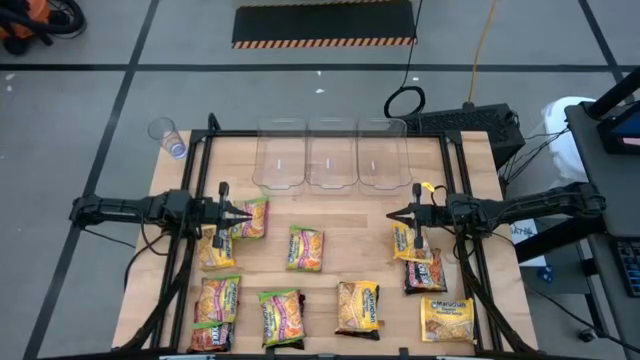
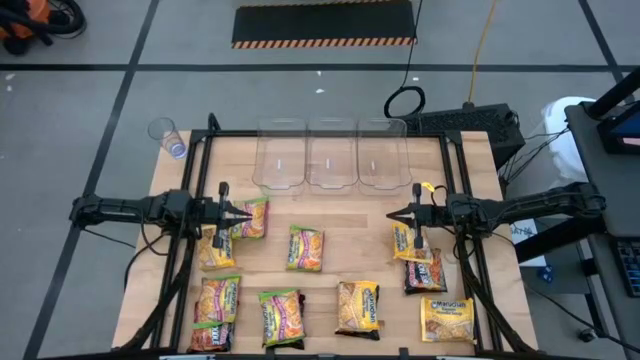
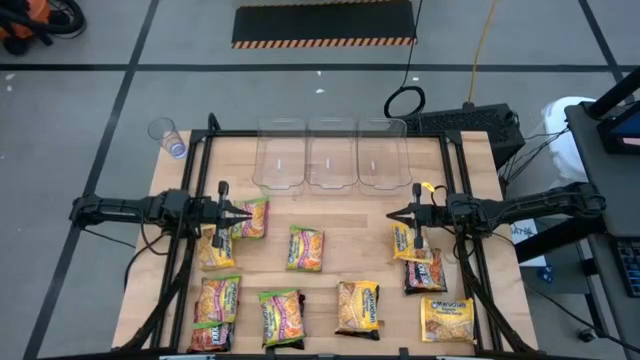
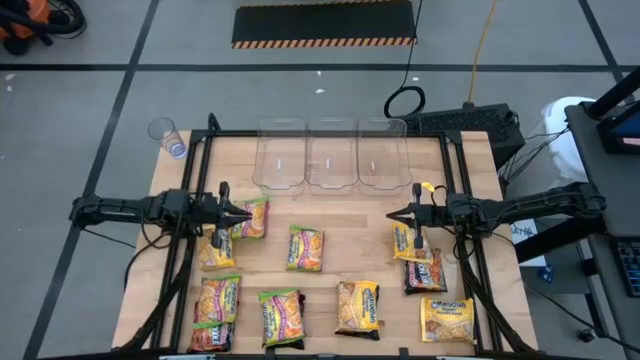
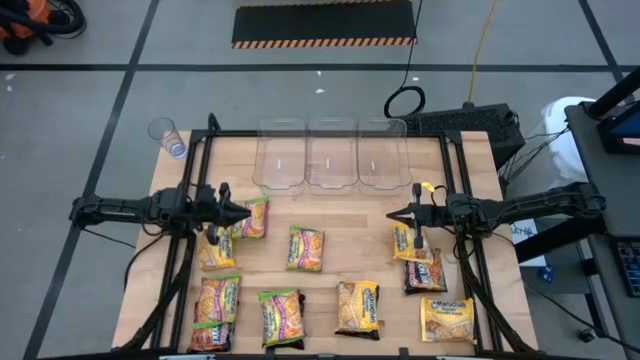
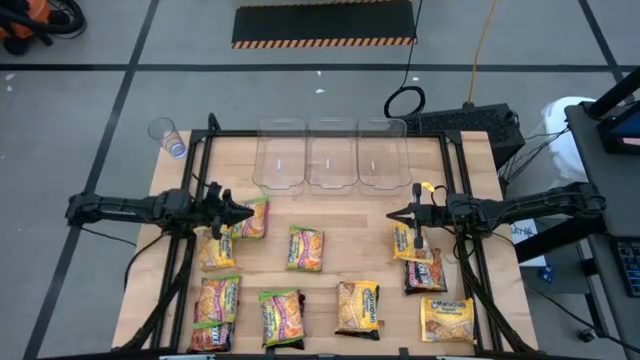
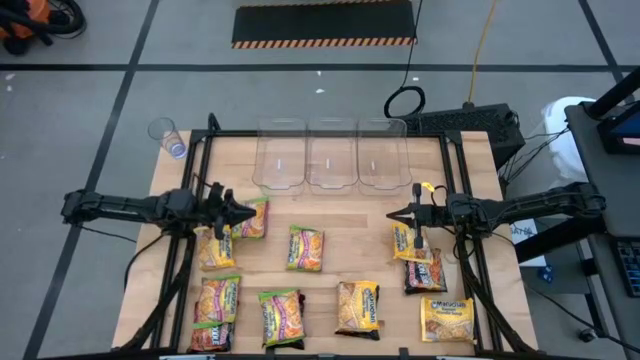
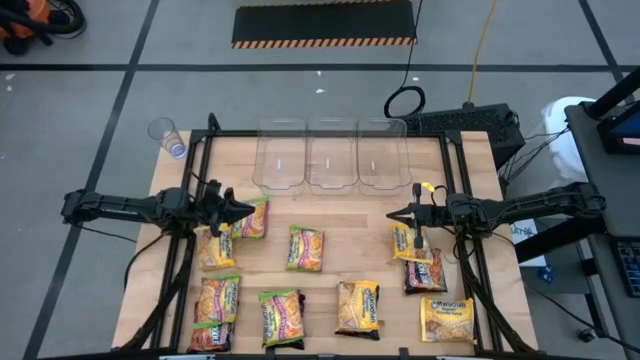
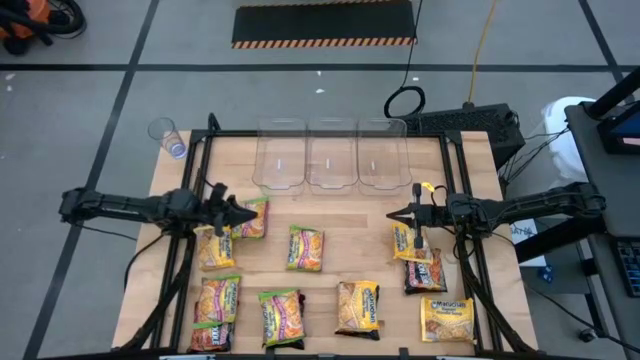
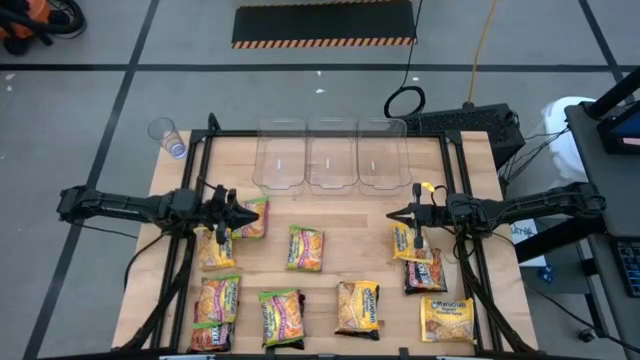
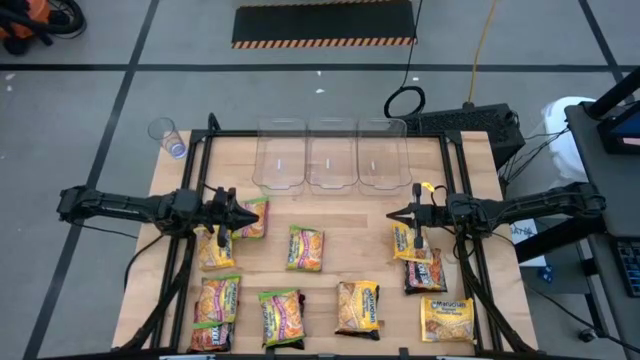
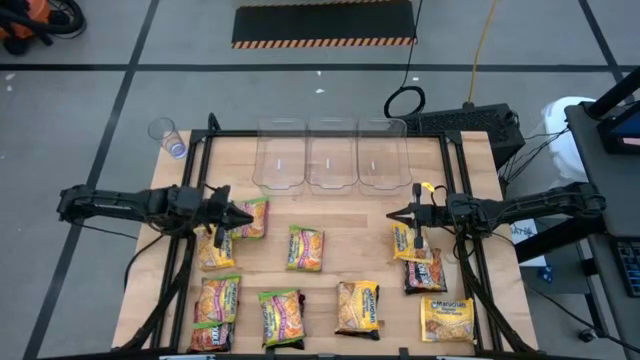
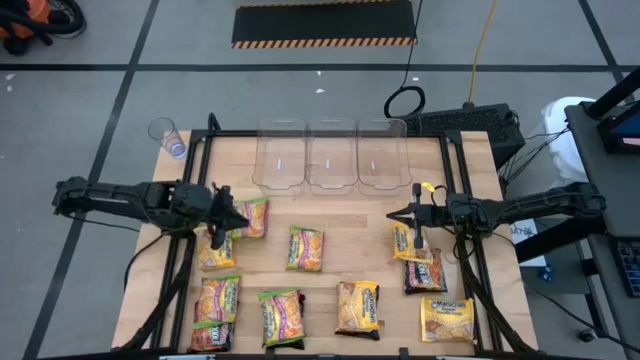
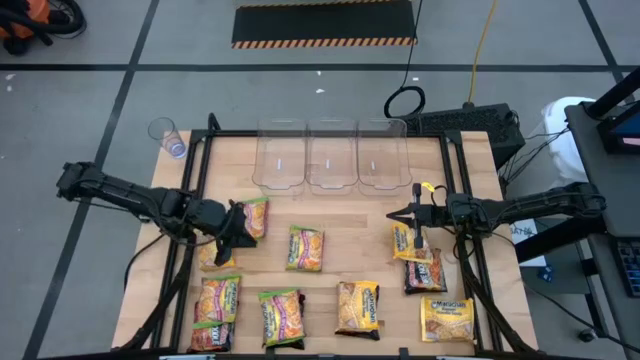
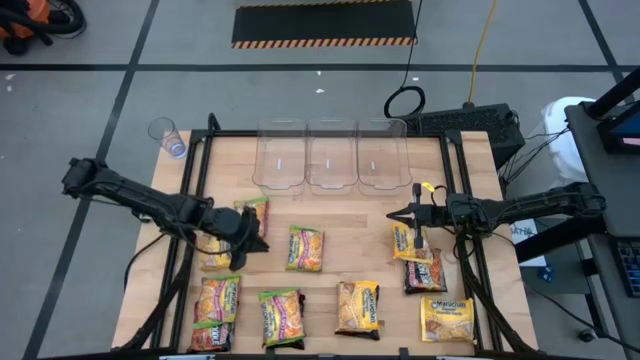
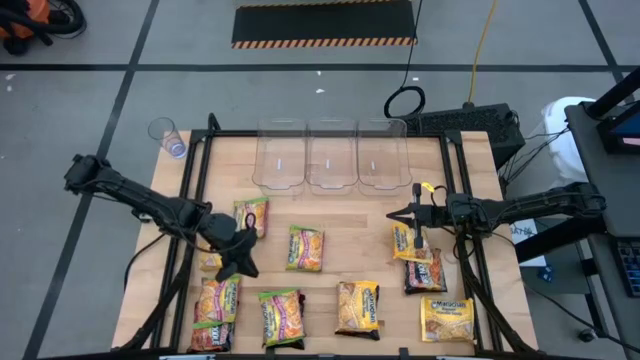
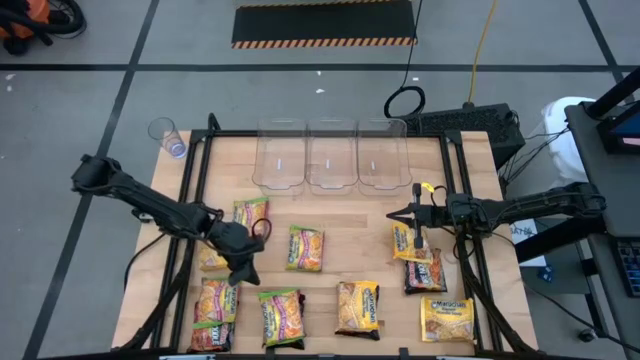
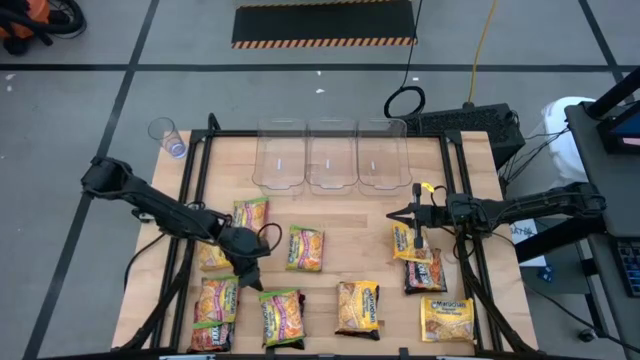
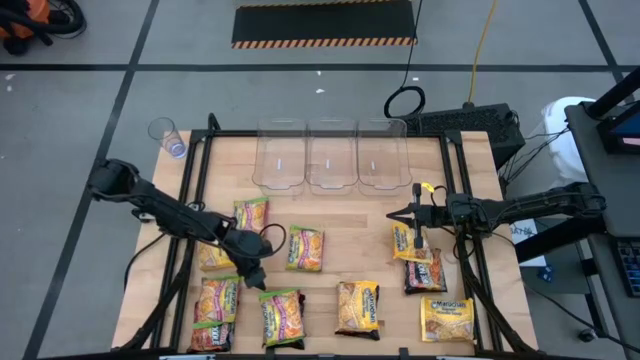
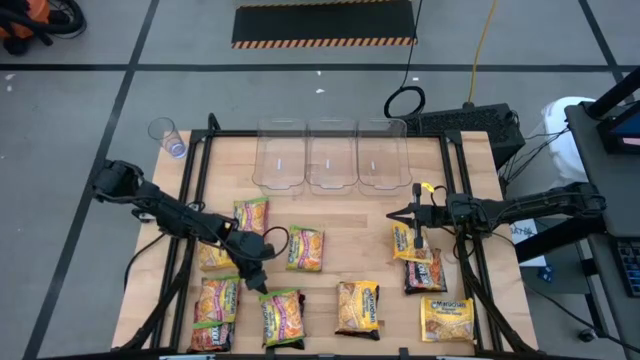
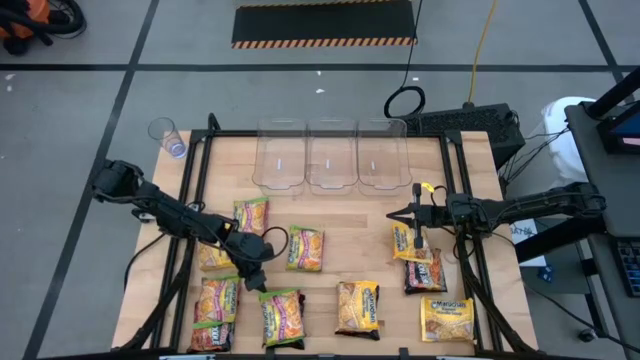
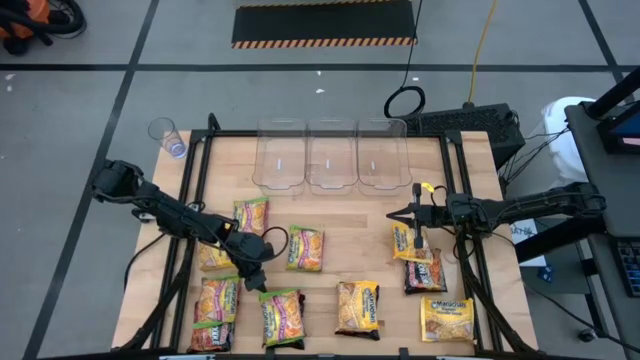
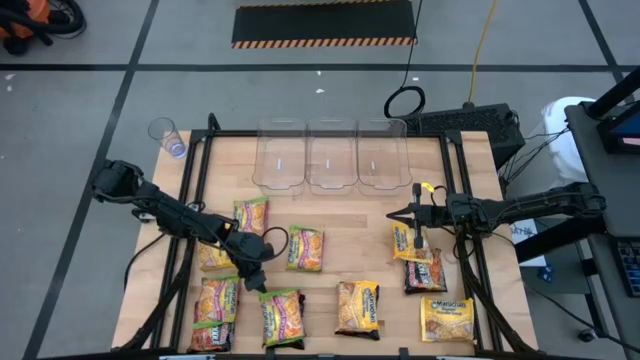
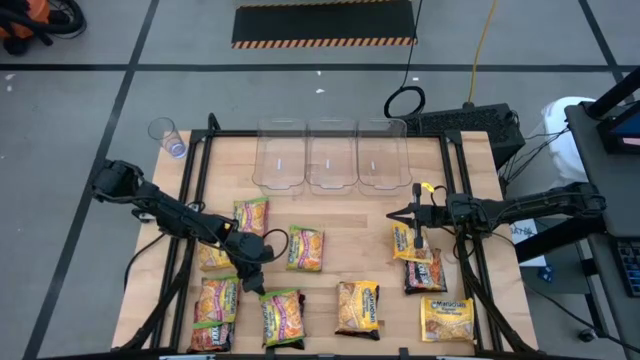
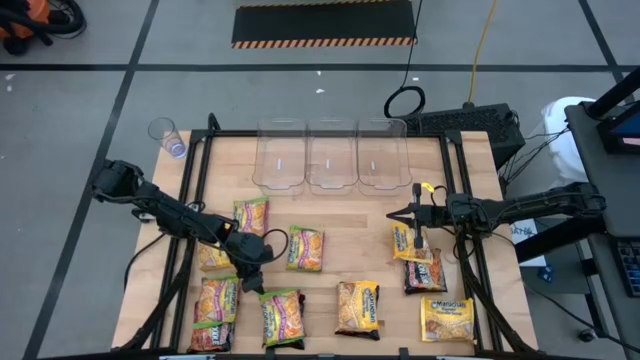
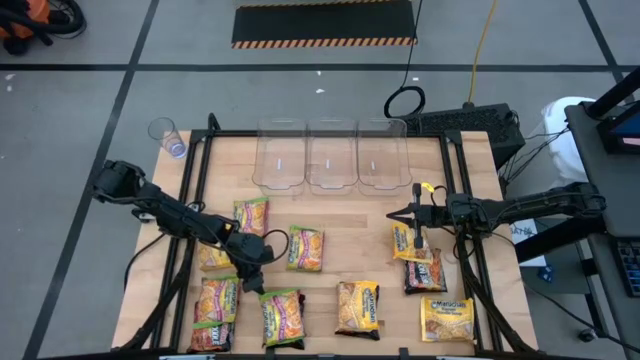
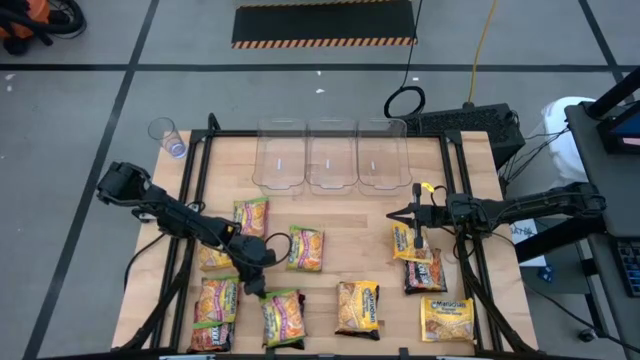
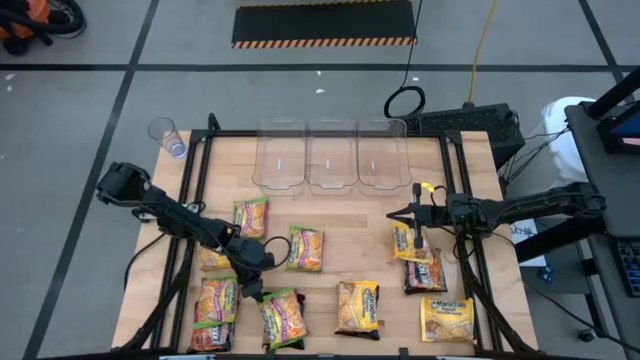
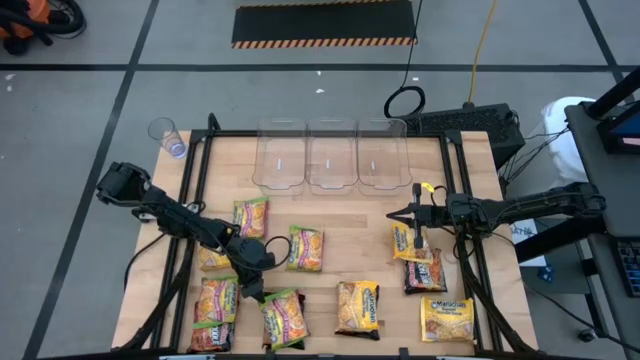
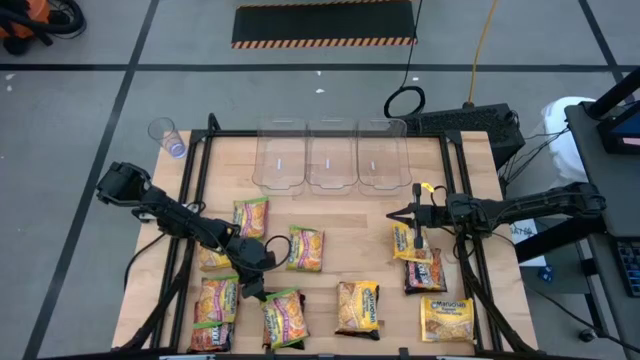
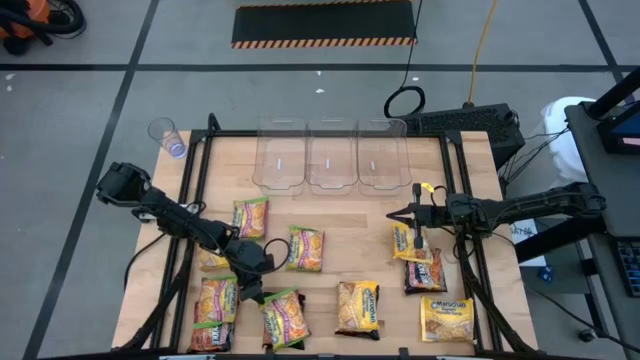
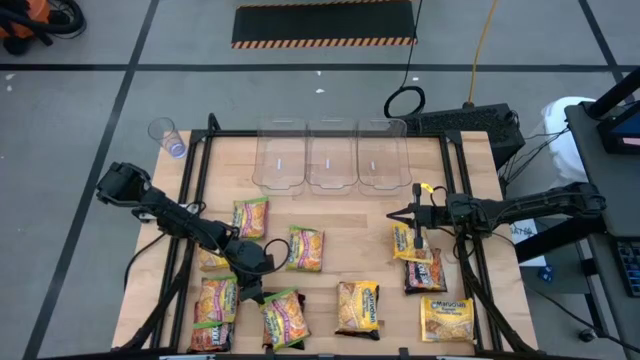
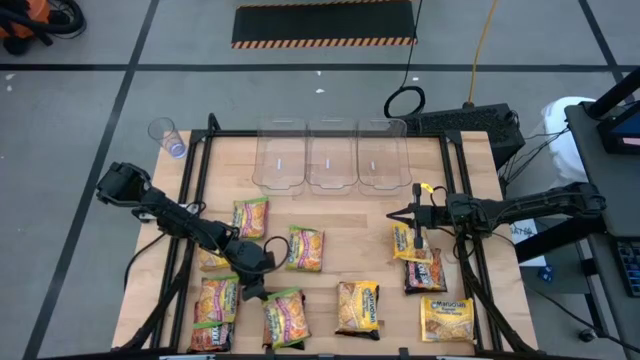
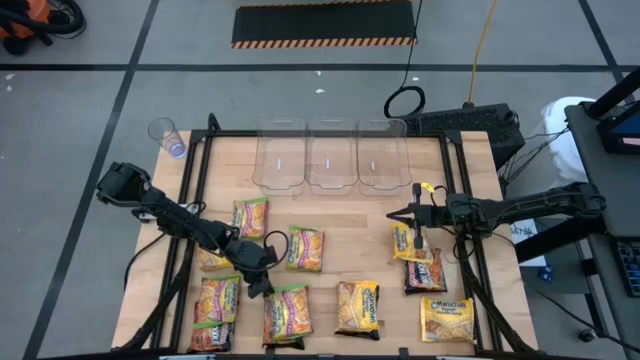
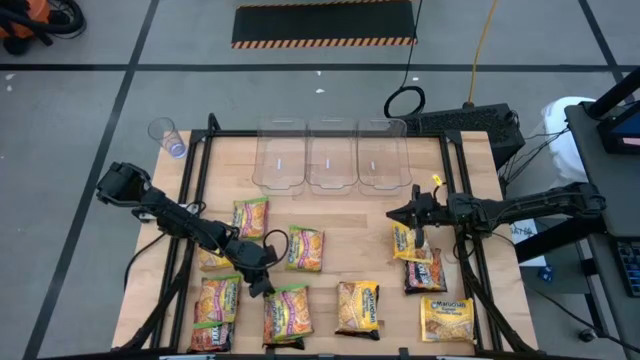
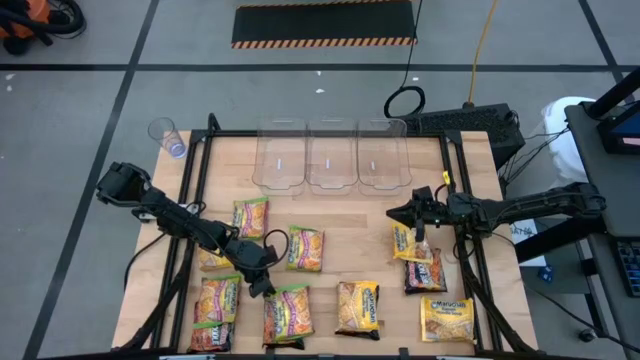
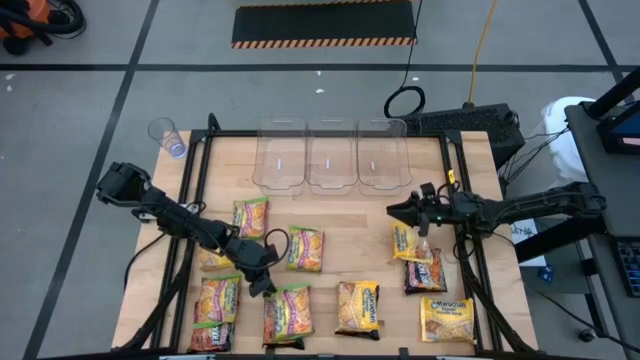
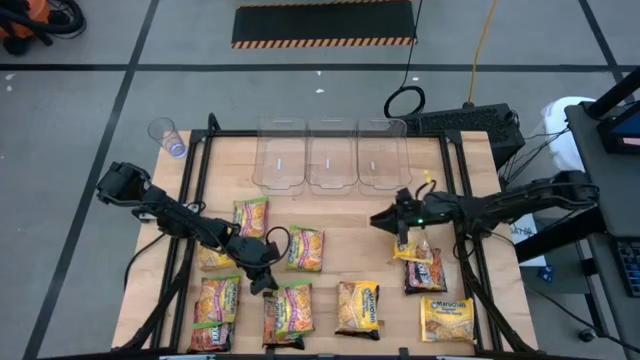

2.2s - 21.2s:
Task: Sort Maruchan noodles
Put the green noodle pack into the center transparent bin

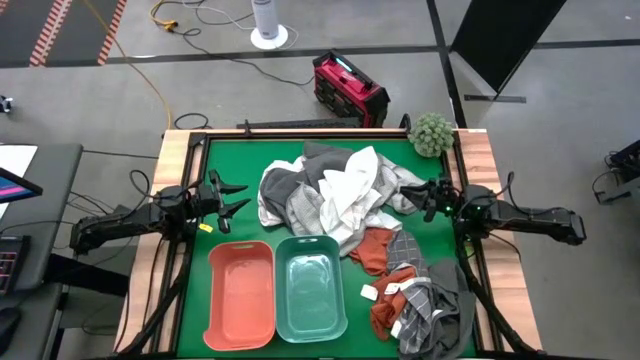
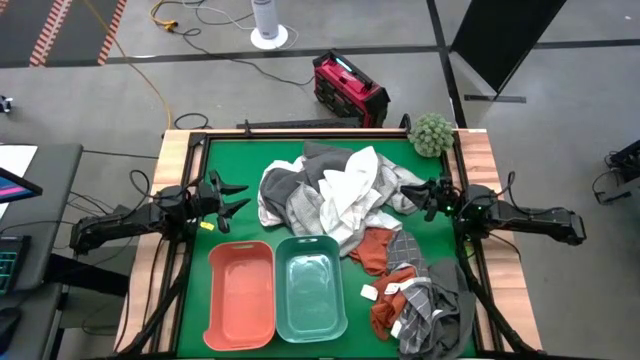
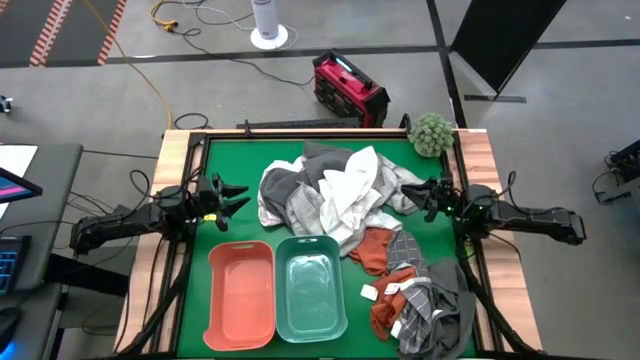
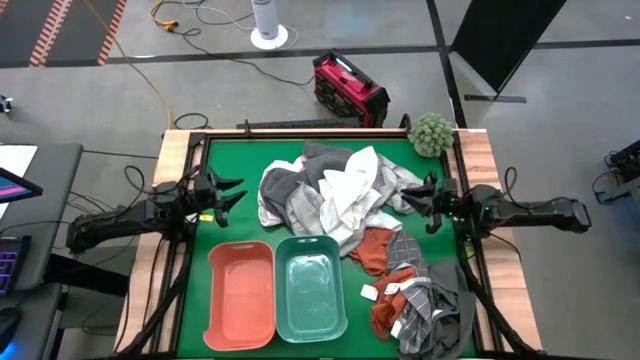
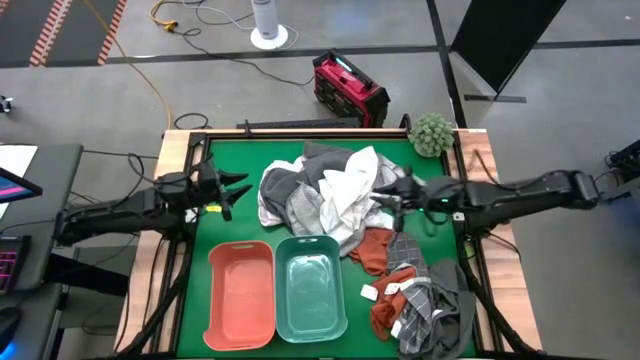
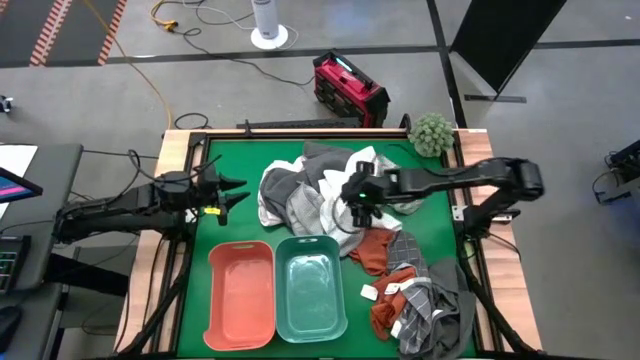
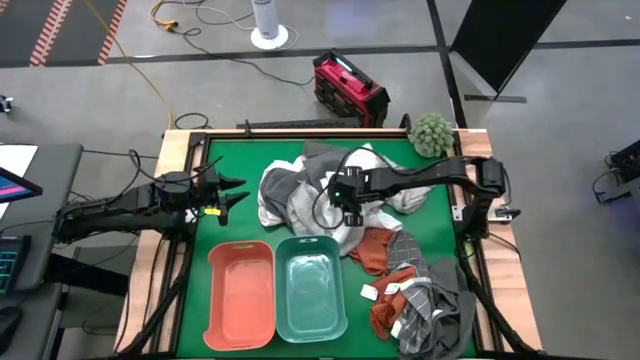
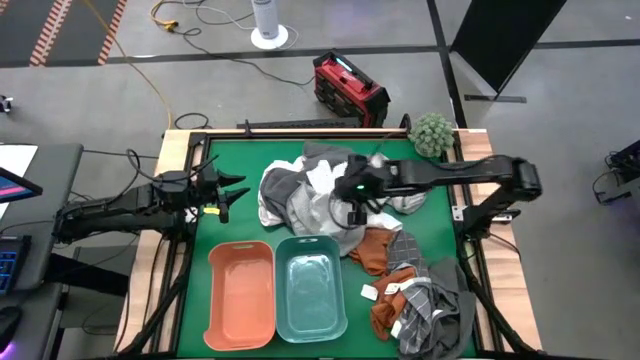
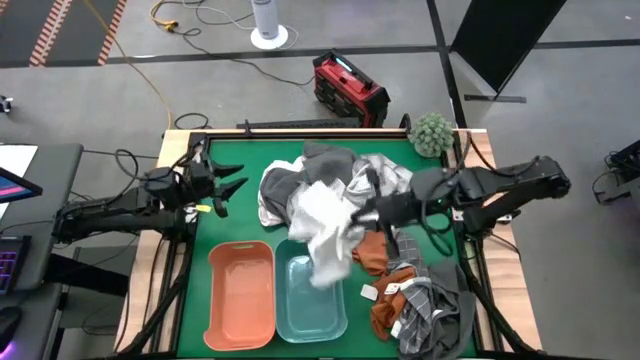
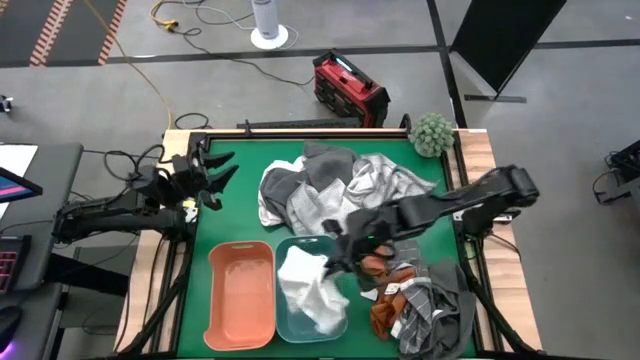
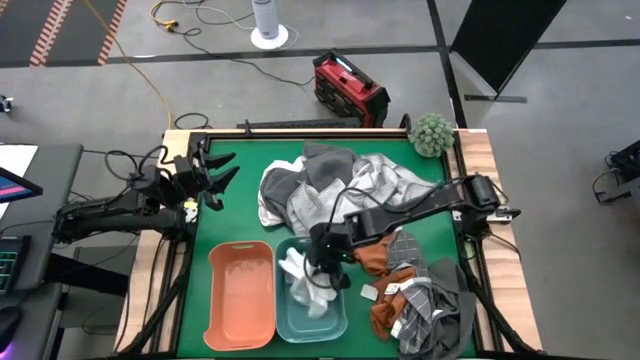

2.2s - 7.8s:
Task: Sort towels by color in basket
Put the white towel into the green bin
